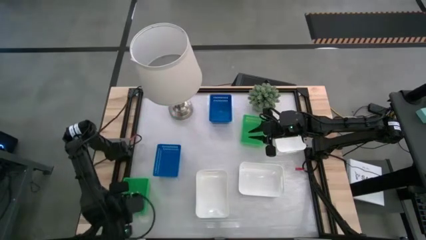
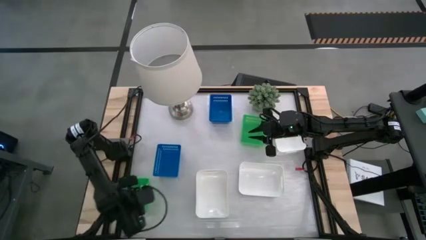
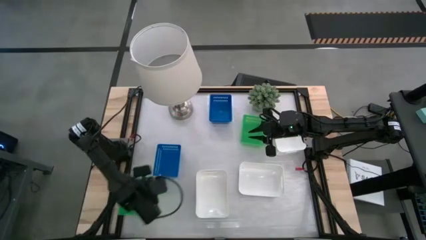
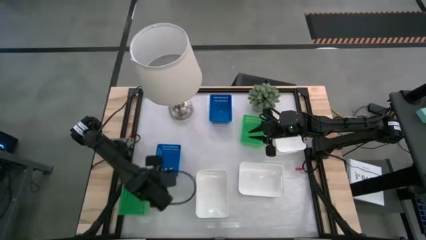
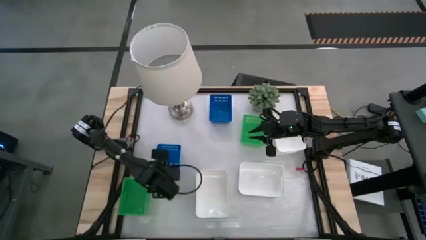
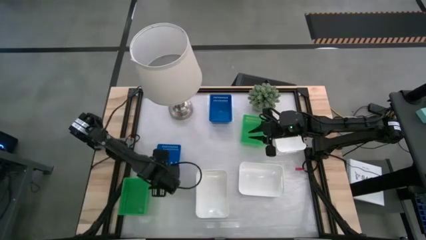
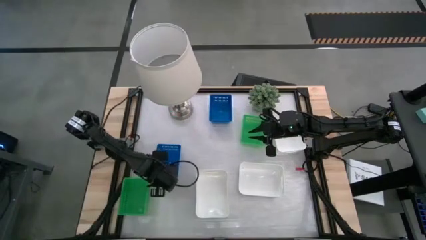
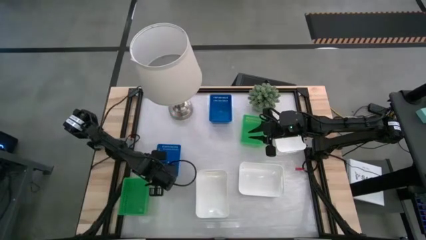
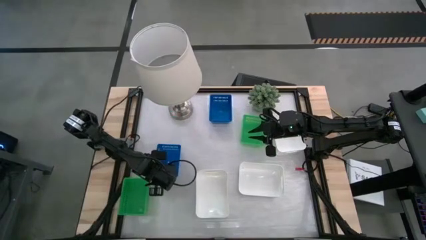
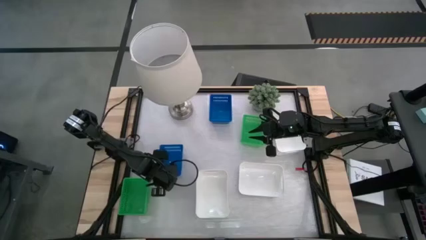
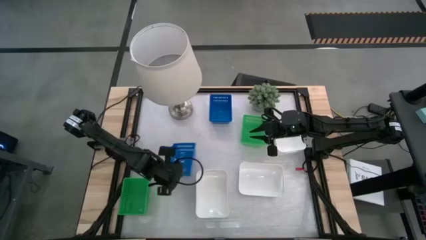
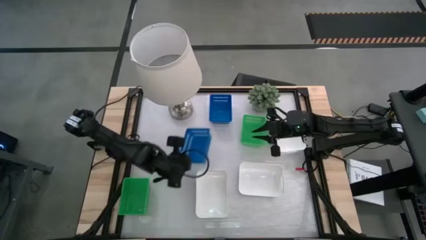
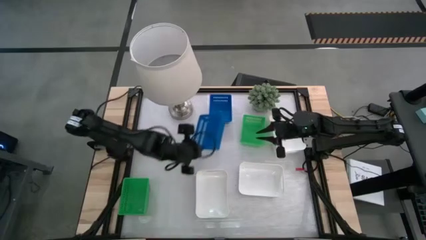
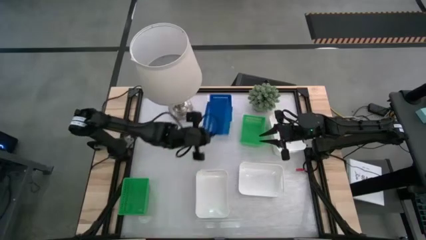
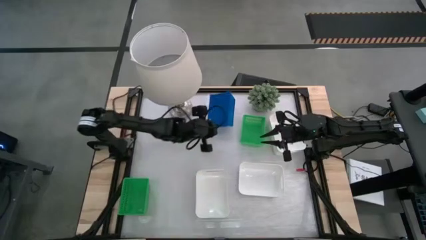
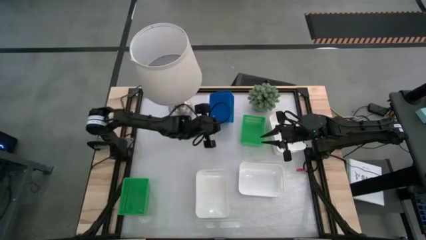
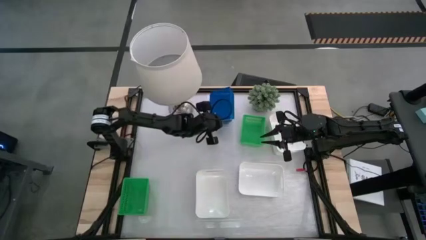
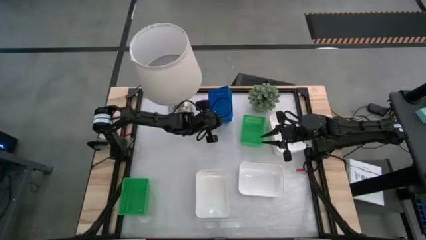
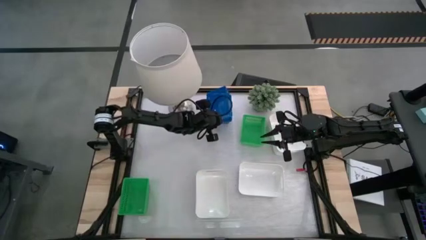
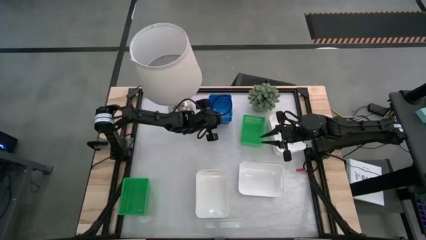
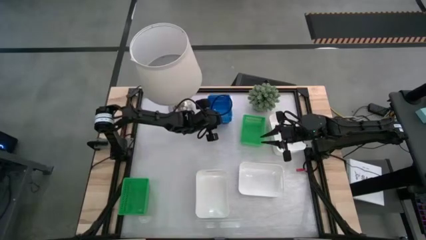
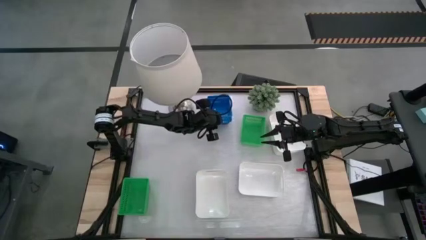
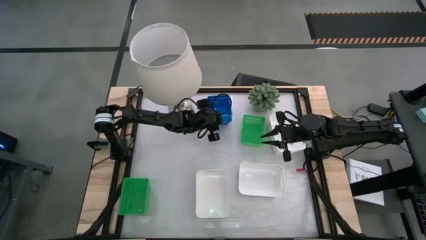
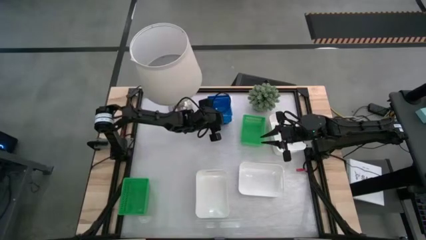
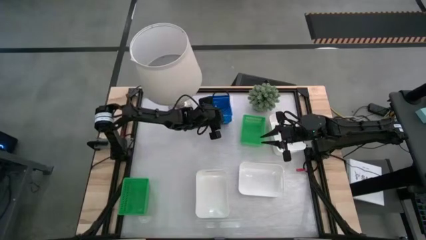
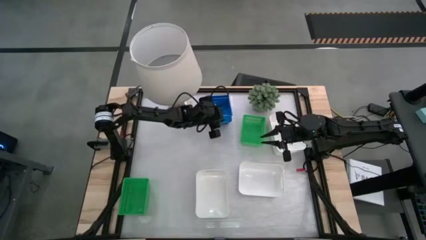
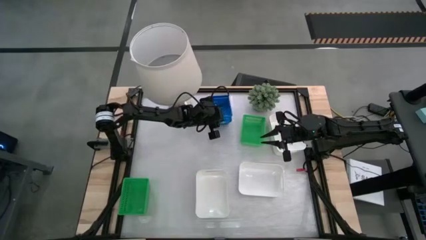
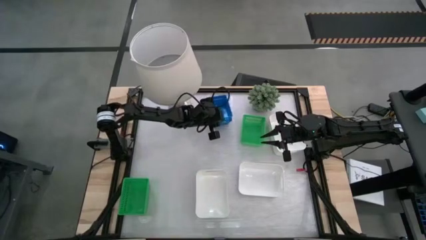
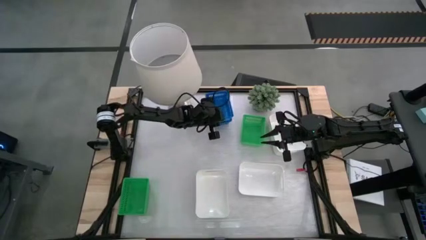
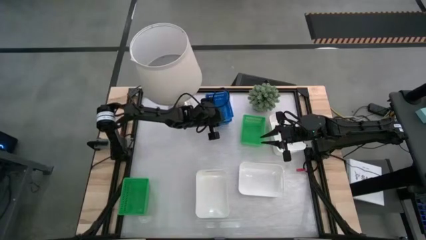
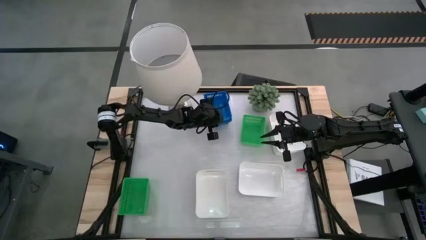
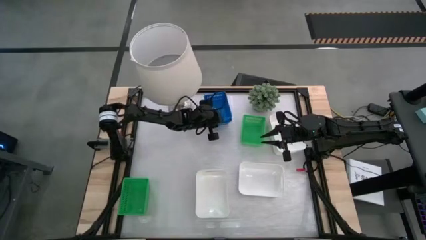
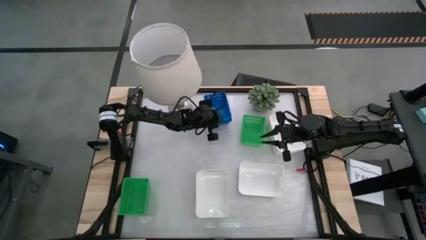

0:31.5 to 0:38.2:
Stack the bottom blue bin on the stacked blue bins

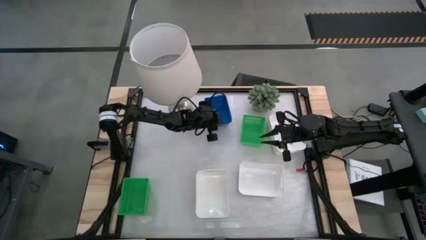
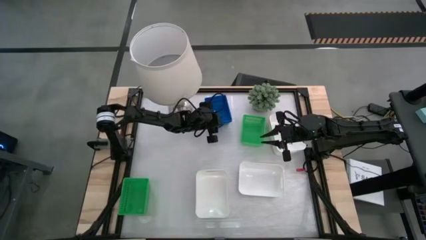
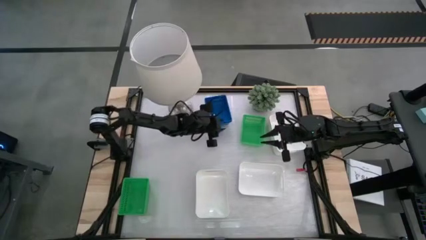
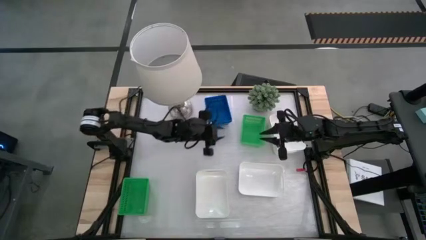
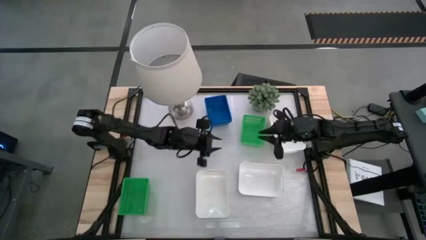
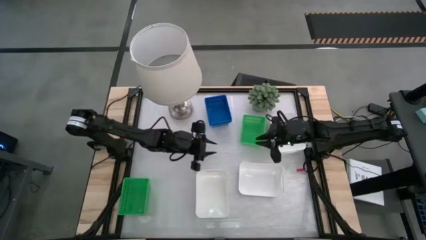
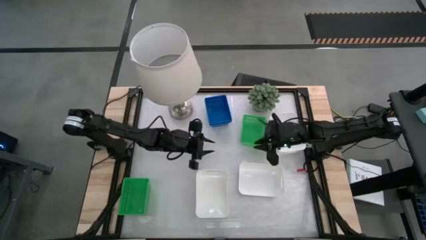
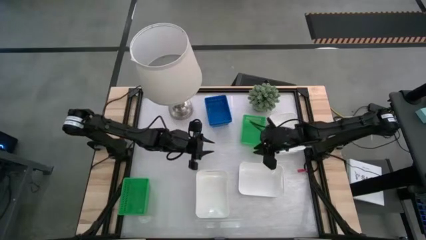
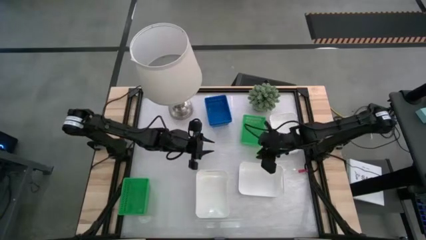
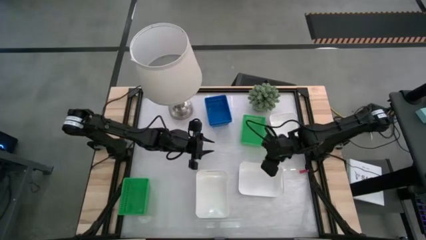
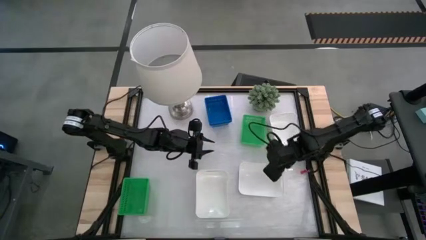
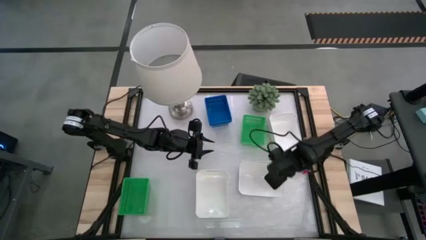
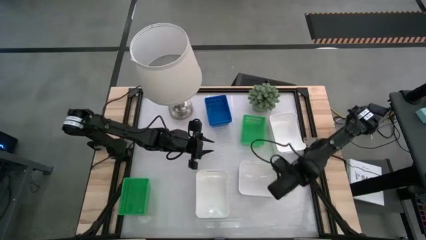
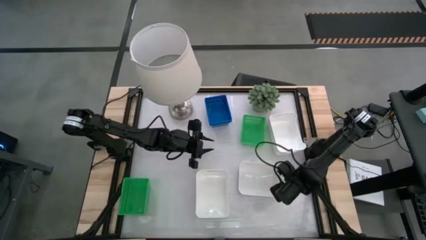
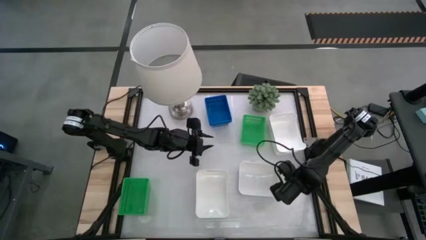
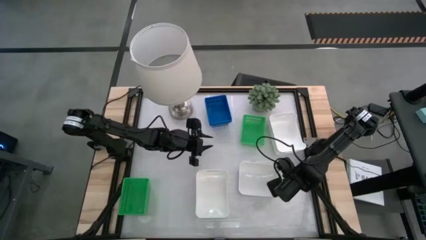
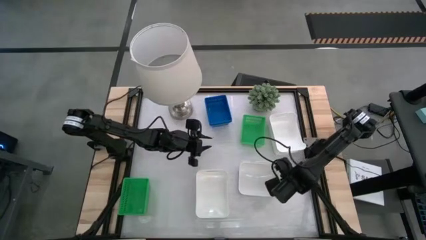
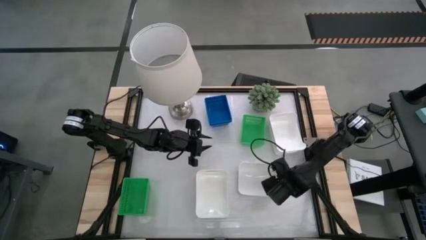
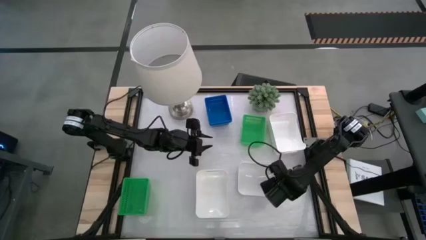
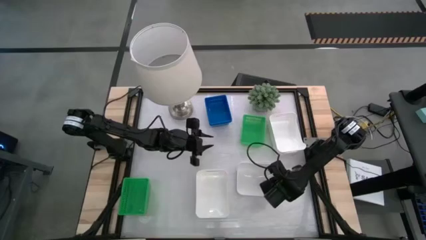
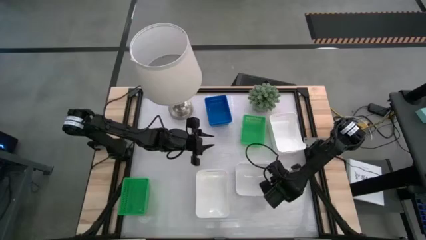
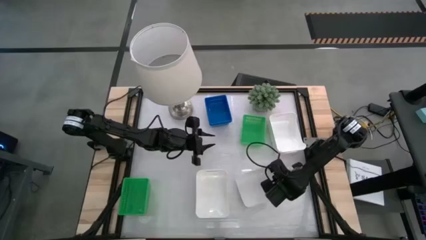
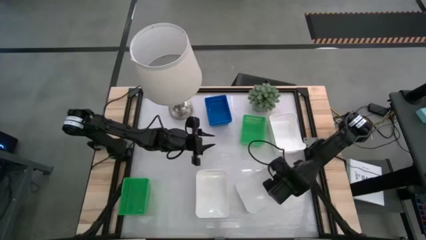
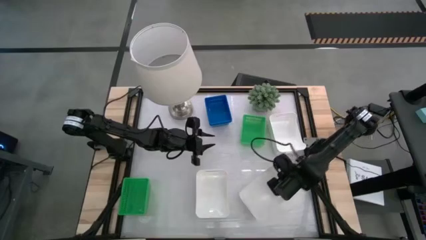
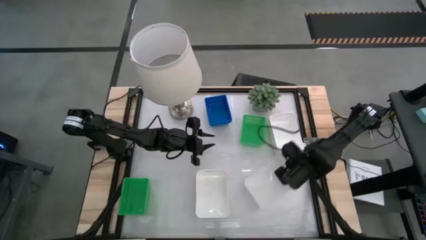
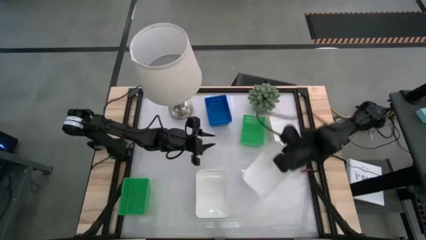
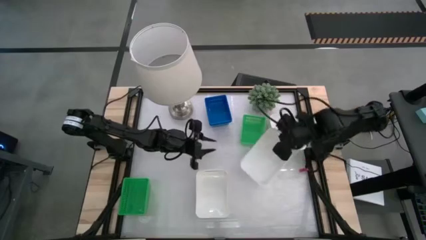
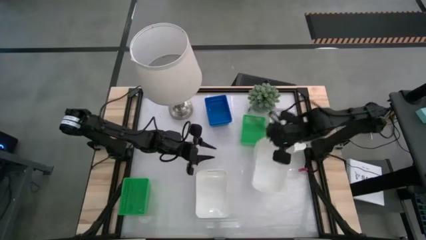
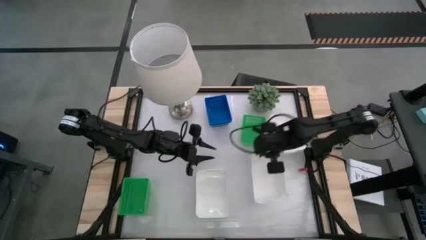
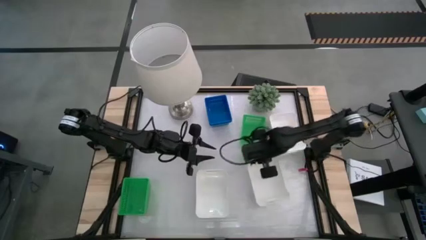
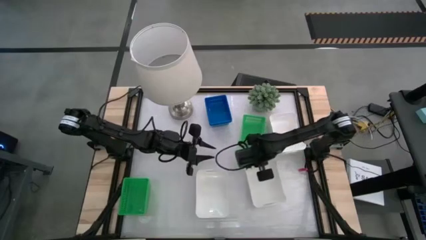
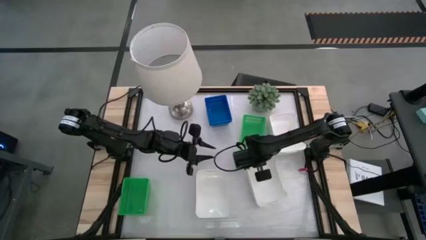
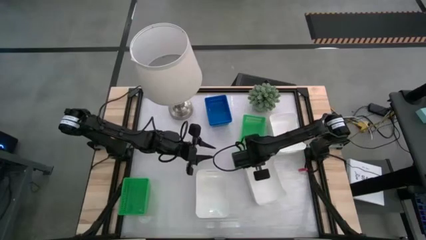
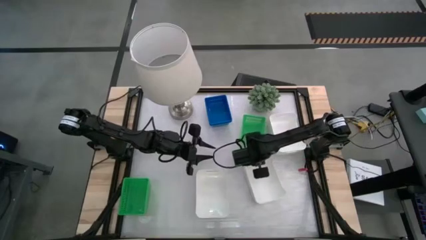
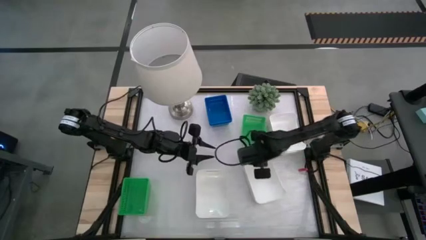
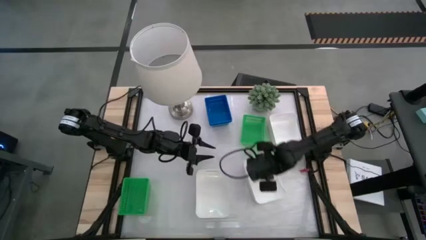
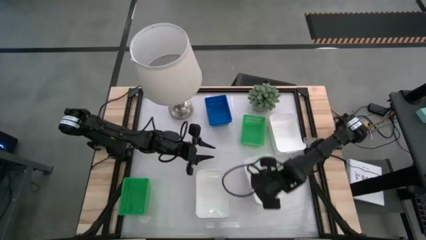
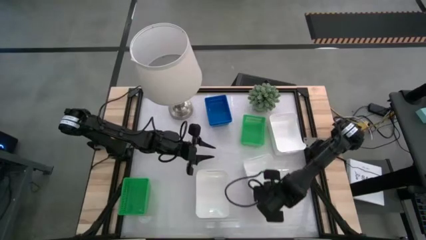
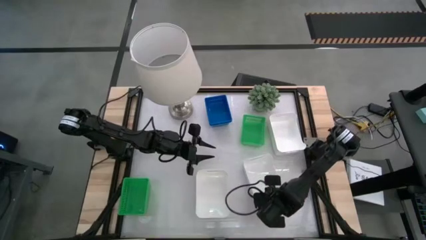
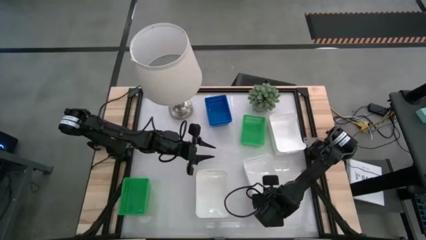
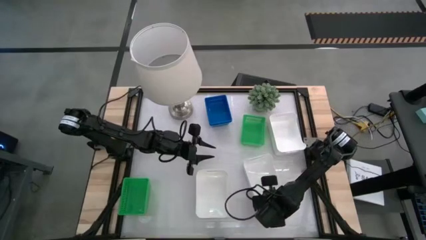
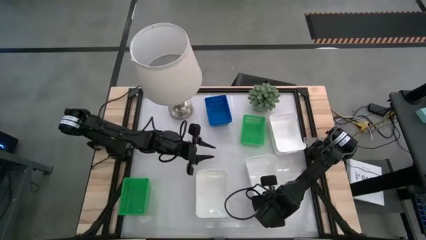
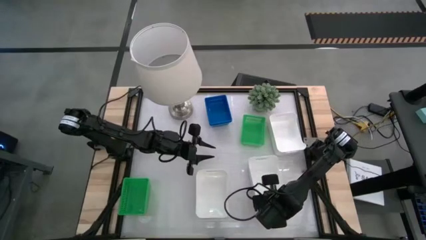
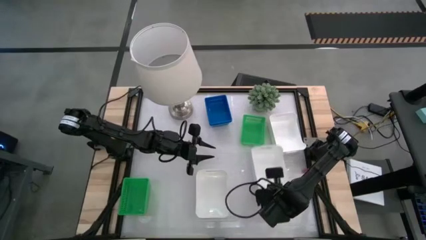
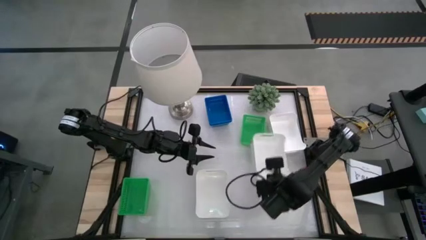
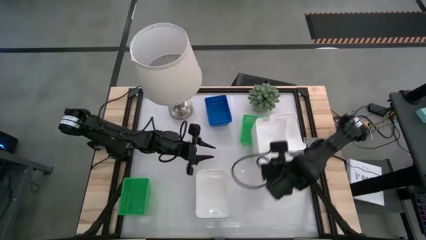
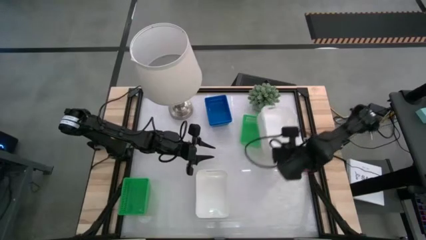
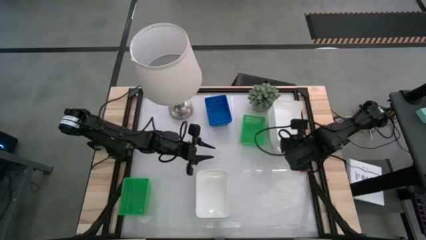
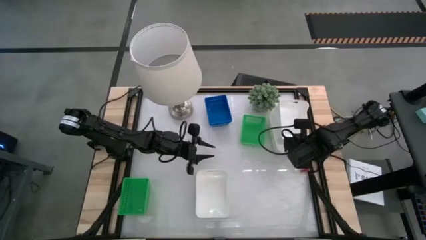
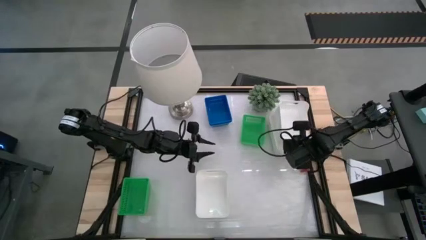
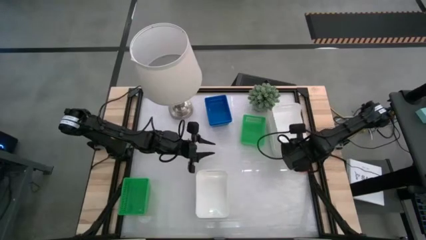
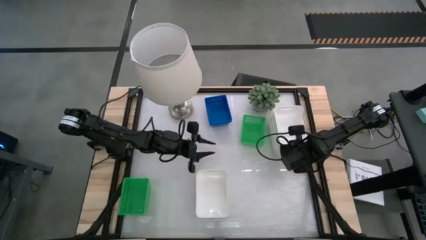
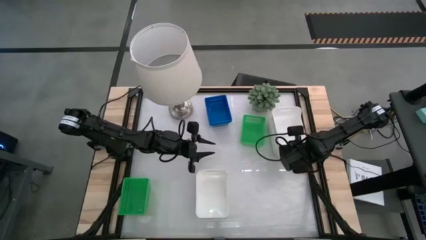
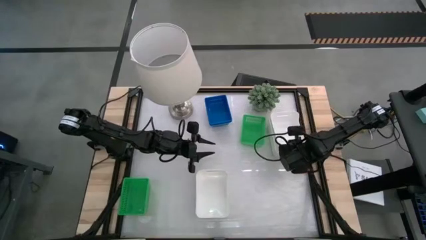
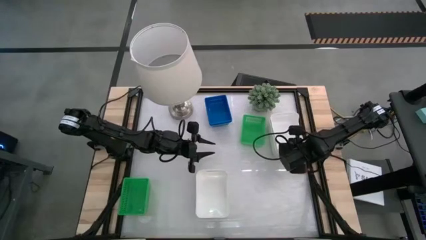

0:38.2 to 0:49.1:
Stack the bottom right white bin on the top white bin
